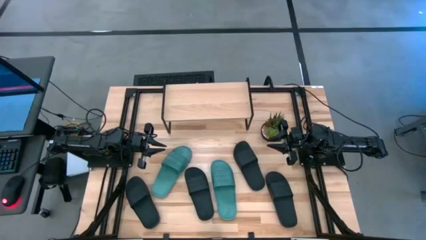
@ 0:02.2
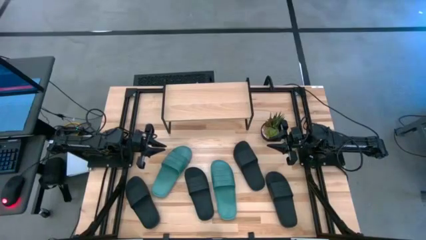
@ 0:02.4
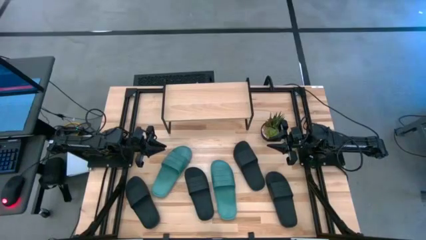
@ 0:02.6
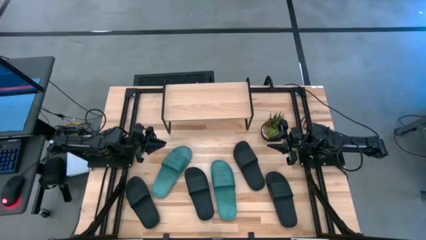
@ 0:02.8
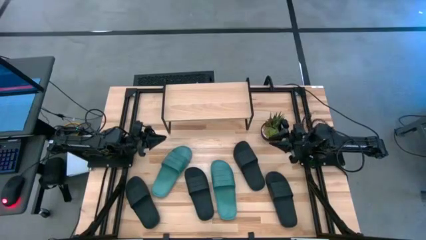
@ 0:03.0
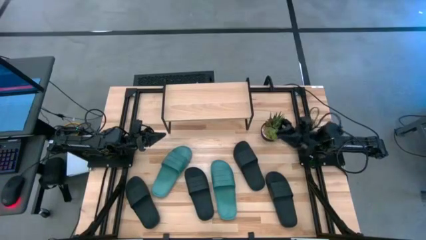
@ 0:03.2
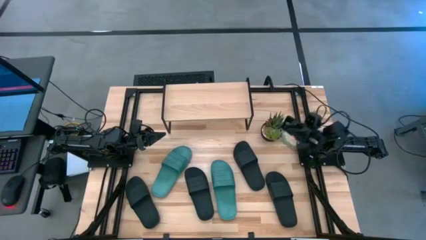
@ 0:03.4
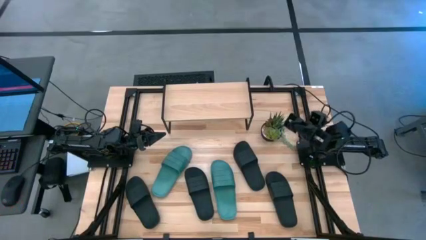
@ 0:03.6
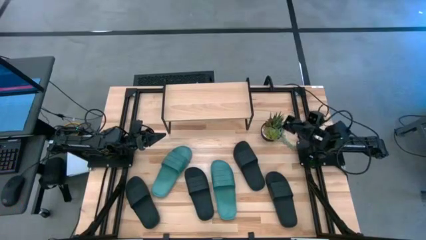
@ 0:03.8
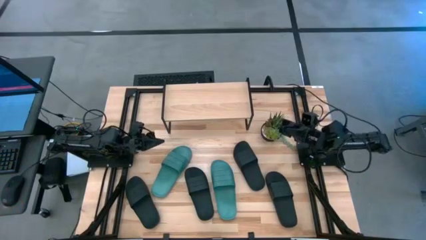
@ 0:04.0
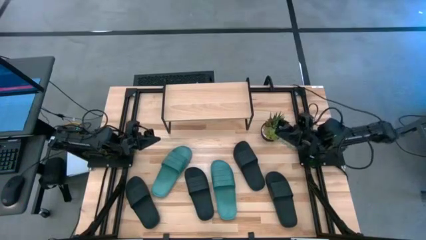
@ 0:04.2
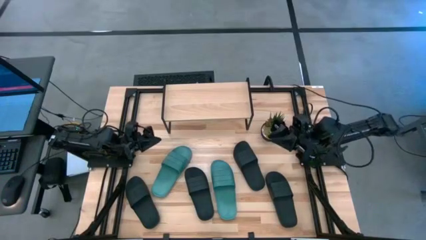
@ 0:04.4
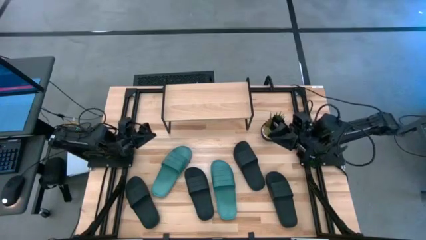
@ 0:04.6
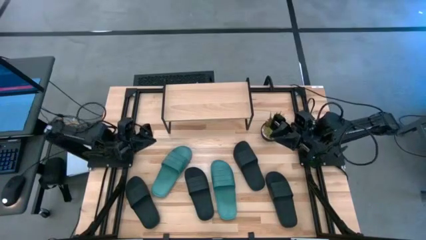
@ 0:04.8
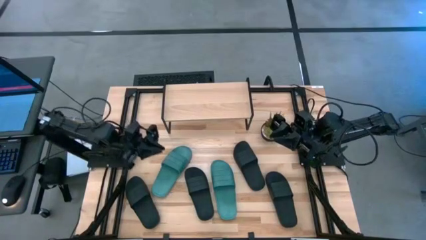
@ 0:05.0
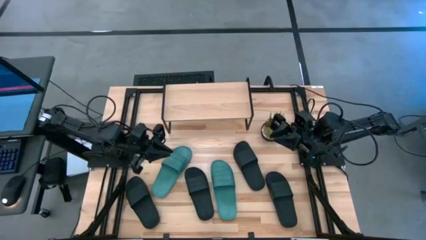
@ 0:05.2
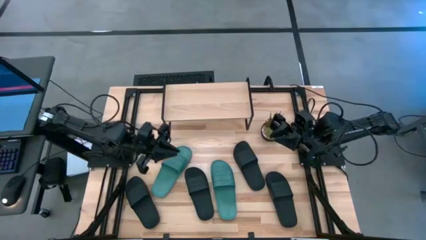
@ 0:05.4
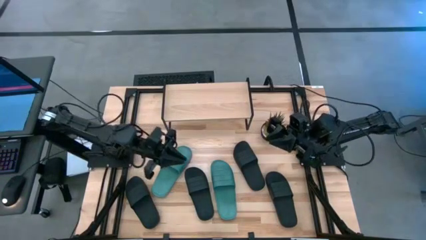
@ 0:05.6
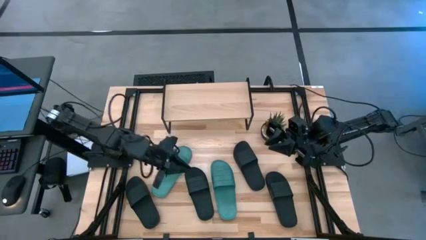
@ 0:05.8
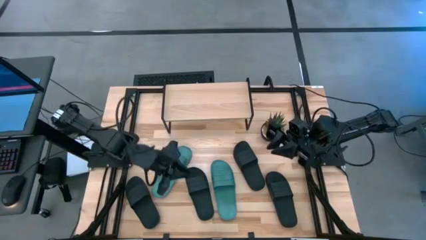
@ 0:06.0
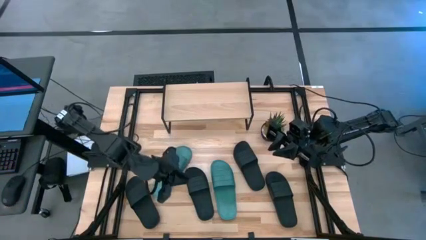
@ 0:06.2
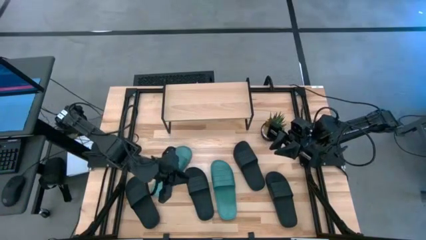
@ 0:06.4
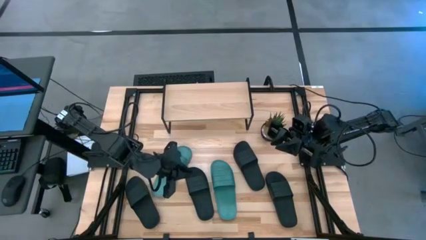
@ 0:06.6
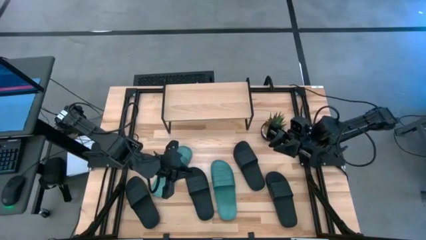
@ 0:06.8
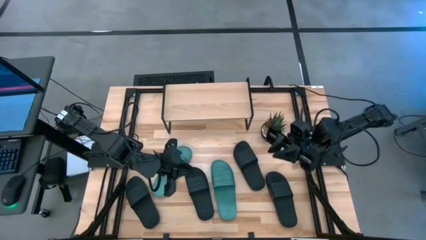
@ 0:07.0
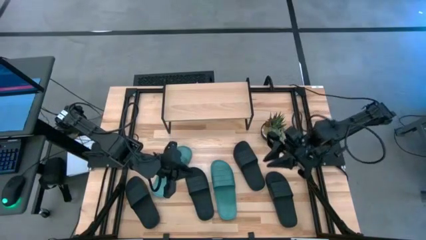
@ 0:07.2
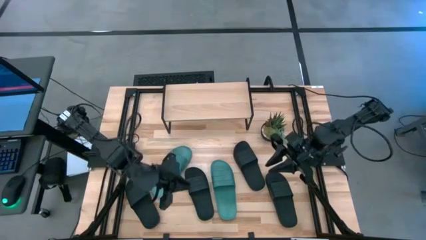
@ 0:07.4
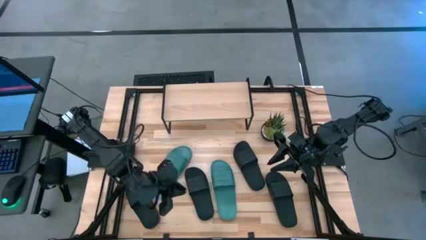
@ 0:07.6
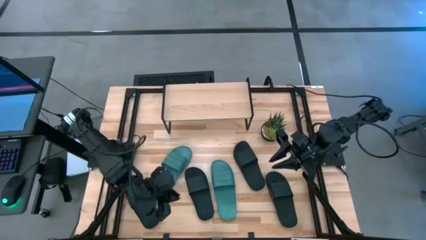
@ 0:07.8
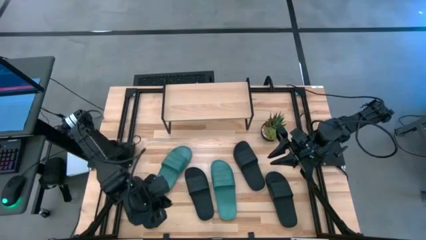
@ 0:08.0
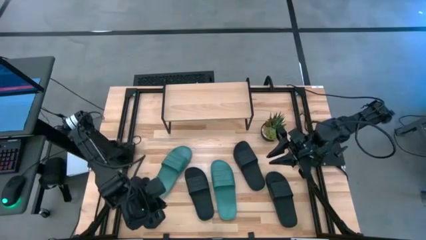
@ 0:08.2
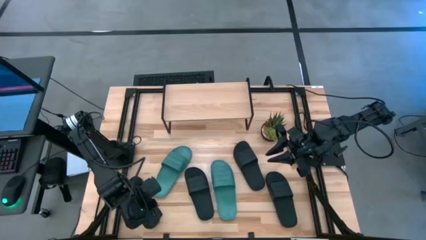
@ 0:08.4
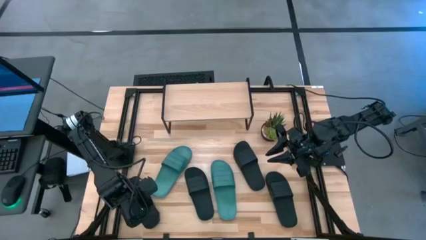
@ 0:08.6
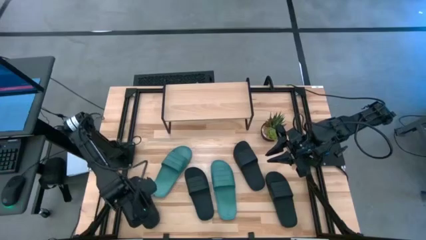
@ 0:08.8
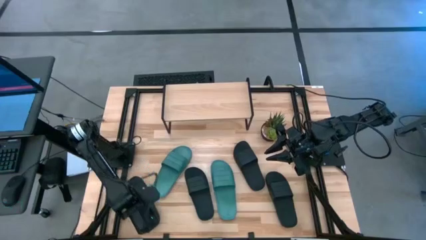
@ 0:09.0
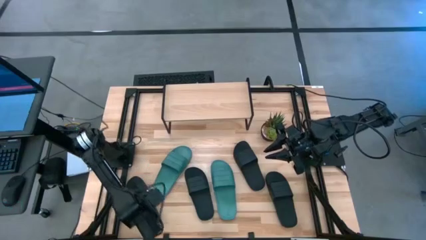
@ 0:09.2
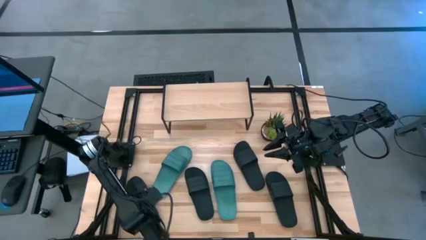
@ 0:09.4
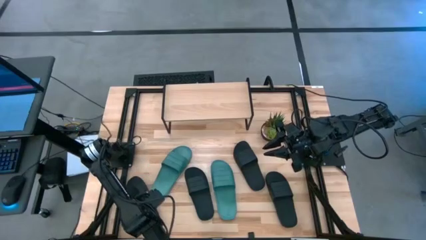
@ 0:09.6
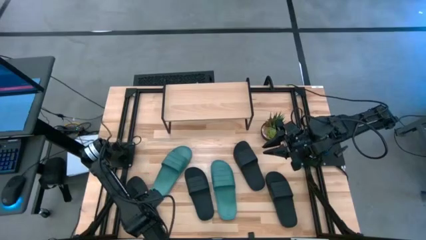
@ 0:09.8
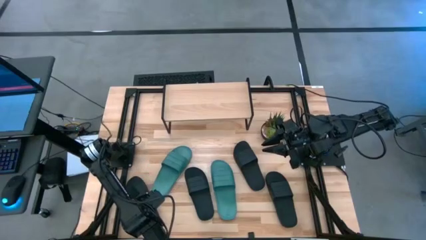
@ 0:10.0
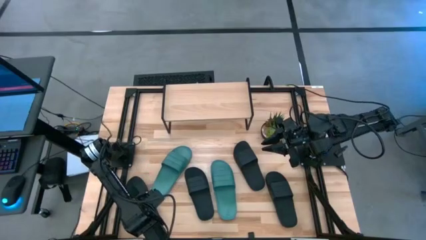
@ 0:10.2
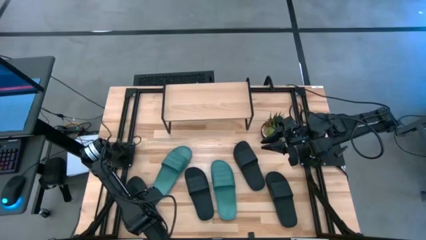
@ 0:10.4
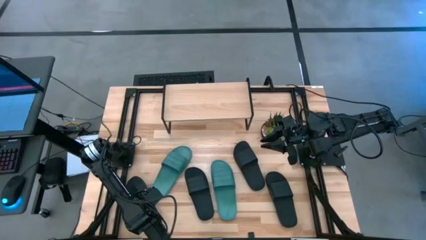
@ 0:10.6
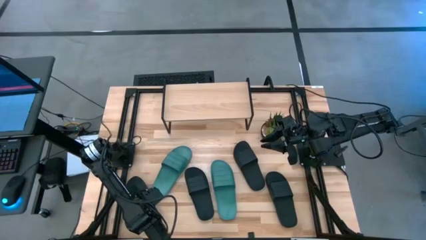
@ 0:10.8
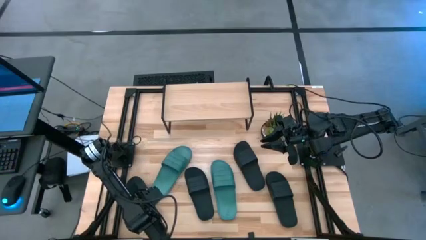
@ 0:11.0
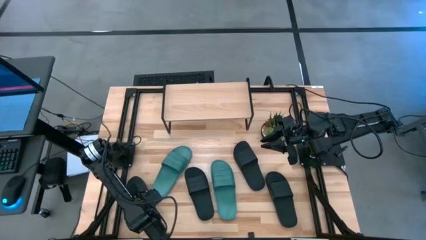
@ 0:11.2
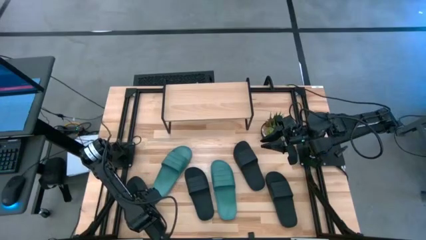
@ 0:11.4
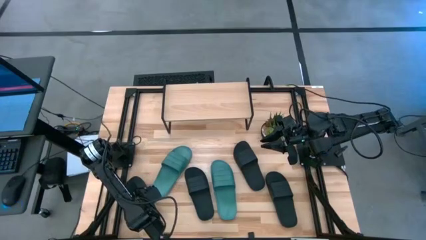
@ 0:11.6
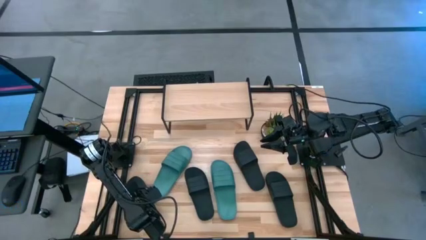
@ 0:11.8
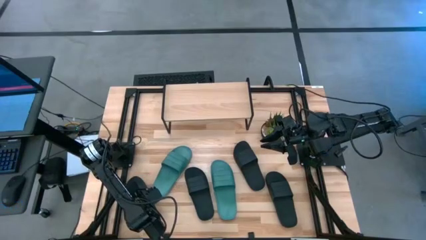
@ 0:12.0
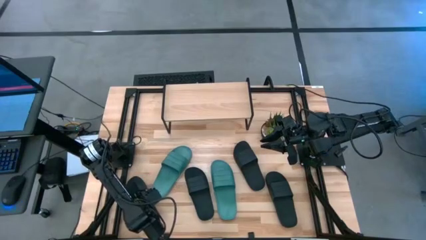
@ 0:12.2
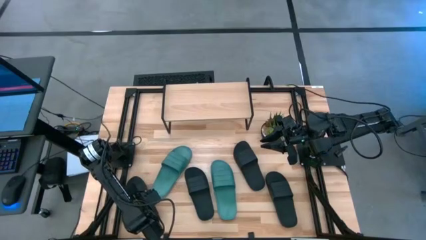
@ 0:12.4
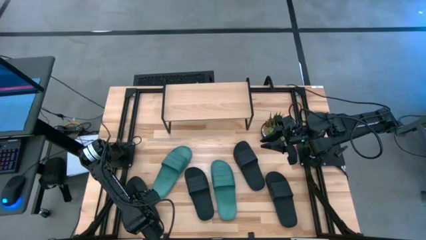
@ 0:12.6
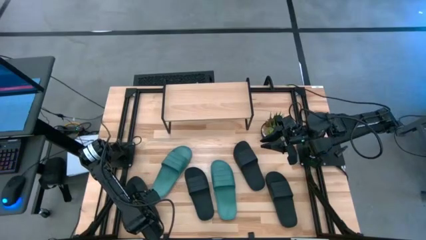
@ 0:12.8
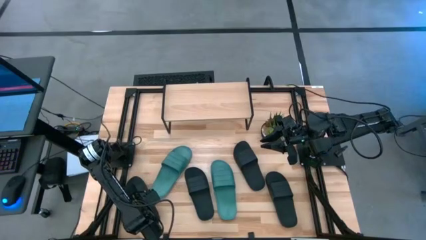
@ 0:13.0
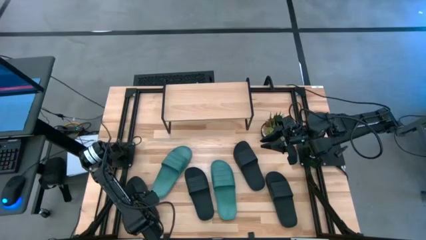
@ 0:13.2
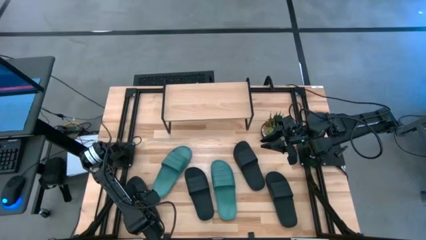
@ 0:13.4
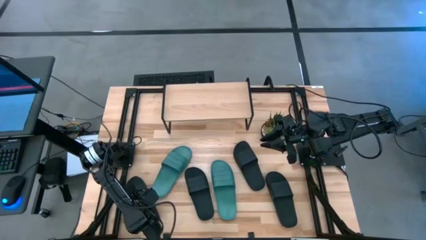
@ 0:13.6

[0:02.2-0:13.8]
Task: Pick and place slides into the shelf
Put the black slide on the shelf
